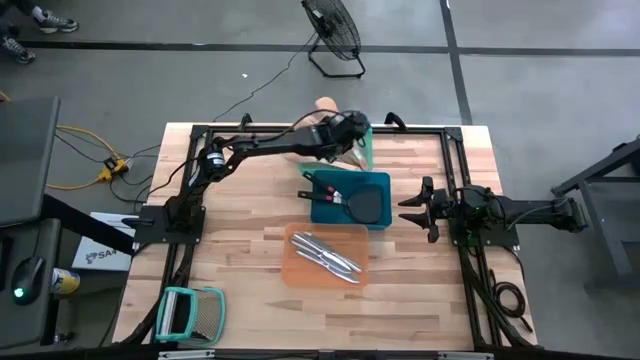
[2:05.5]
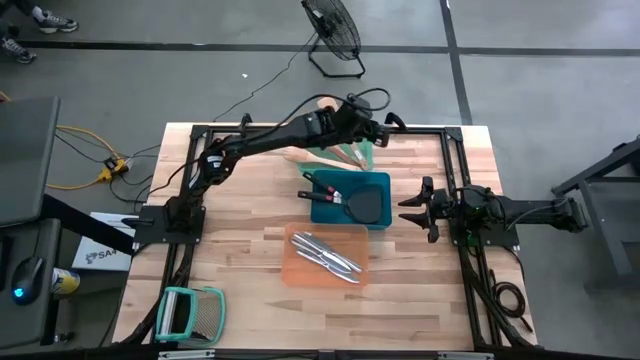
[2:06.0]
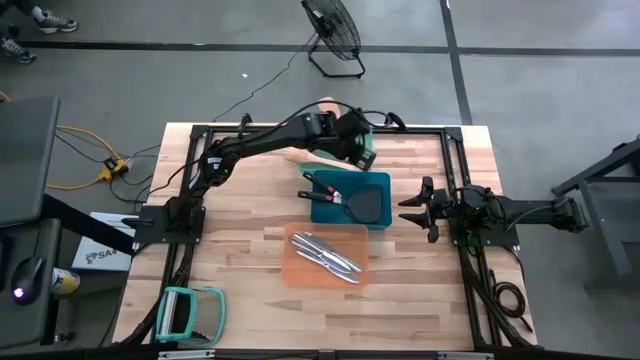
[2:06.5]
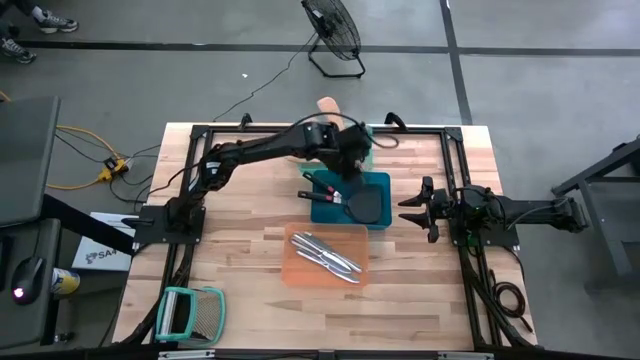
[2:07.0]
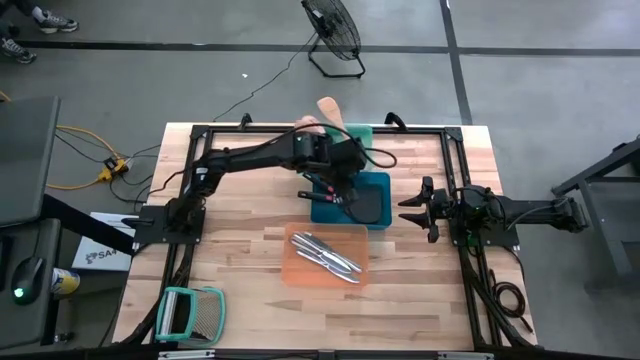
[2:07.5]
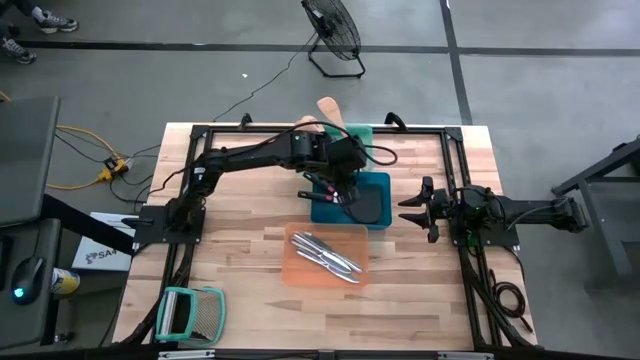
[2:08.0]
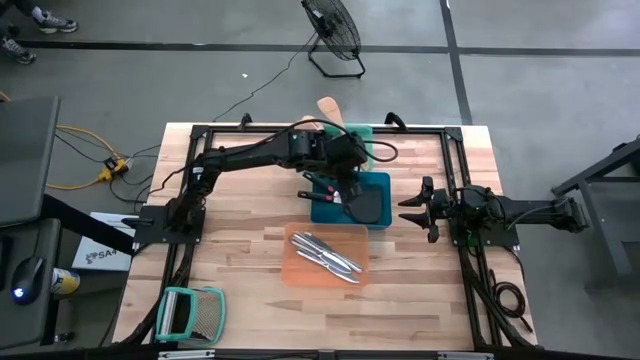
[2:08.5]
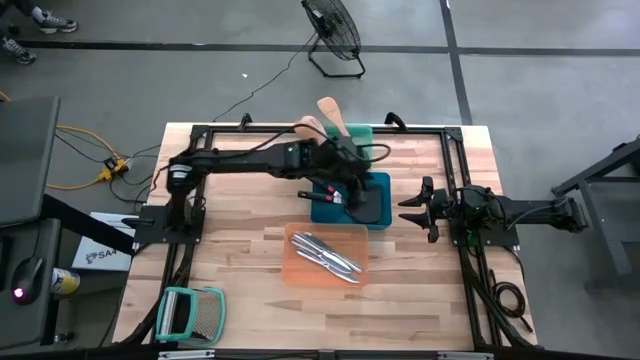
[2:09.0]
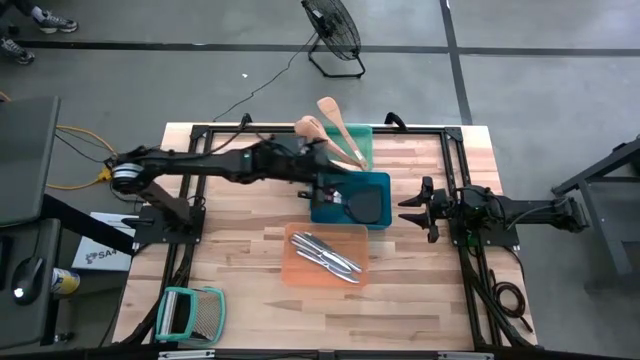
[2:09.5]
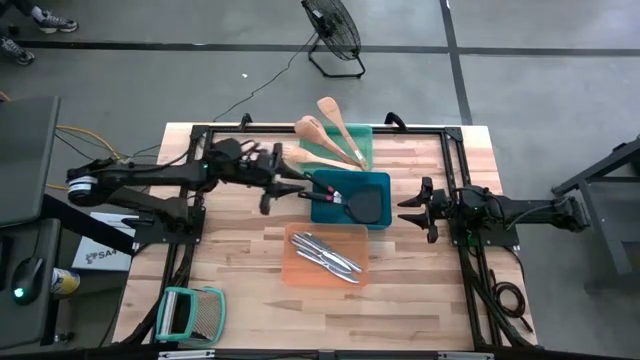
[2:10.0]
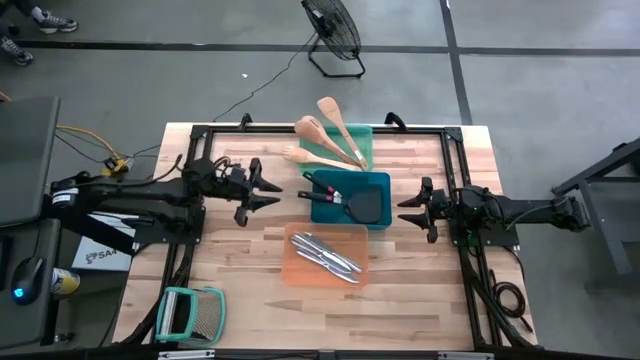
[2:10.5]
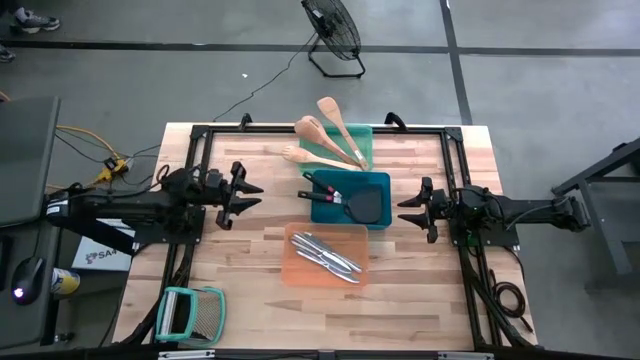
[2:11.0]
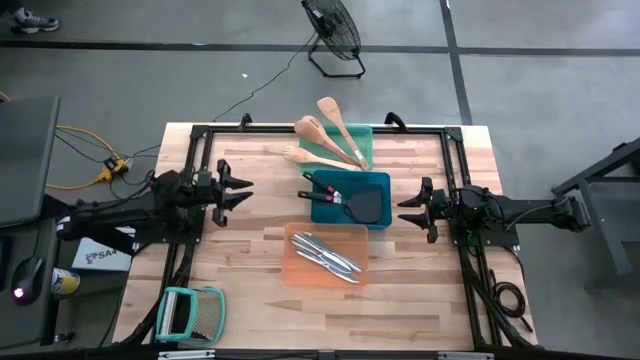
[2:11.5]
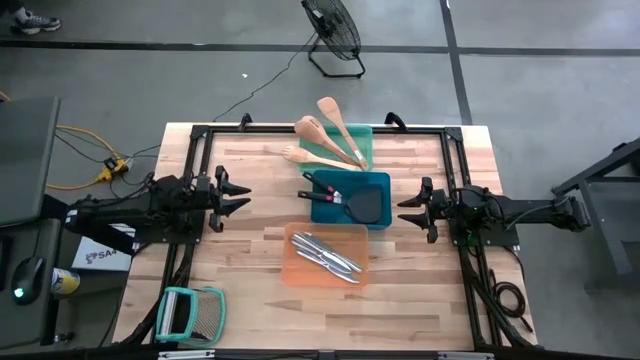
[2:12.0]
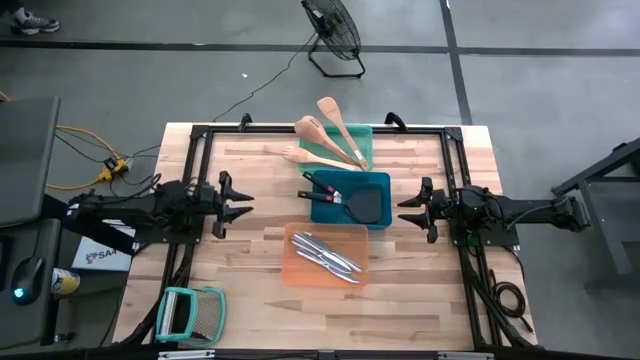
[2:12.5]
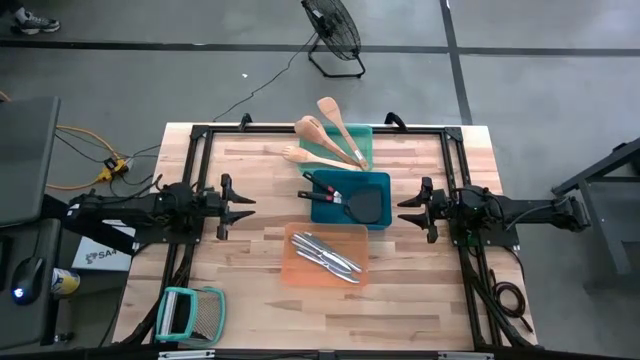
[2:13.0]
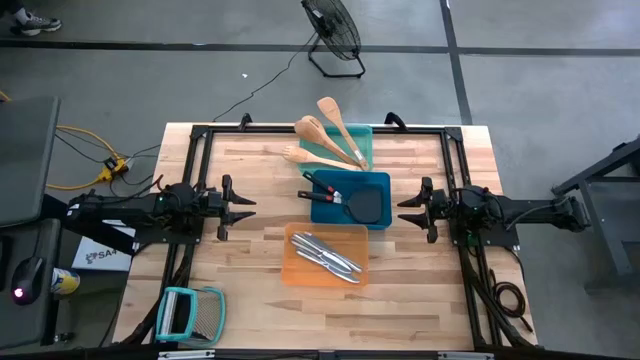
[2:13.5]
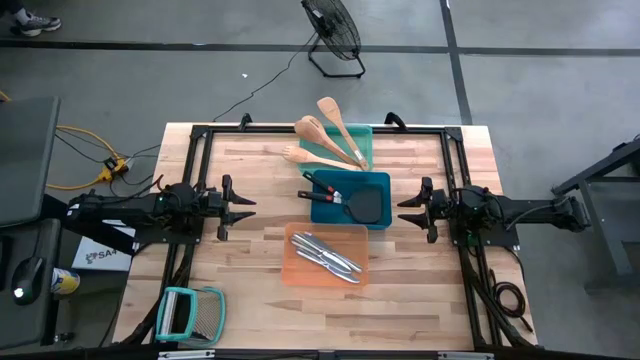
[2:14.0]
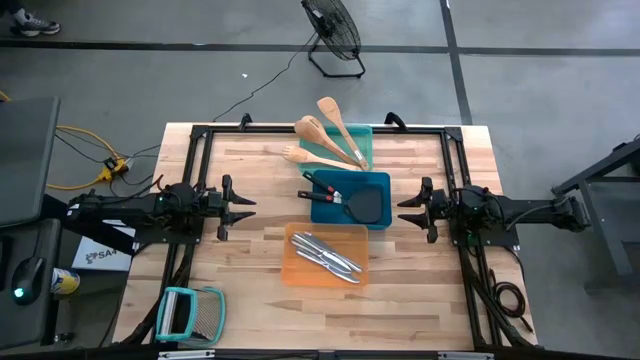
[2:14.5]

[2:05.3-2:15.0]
Task: Pick & Place Kitchen Items
Return to Home Position
